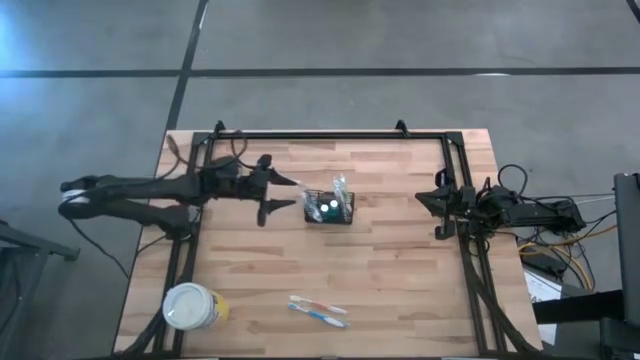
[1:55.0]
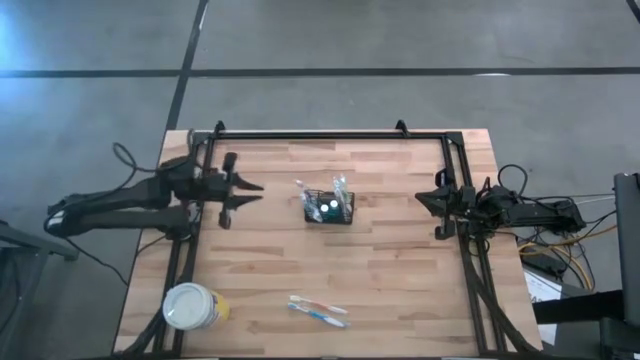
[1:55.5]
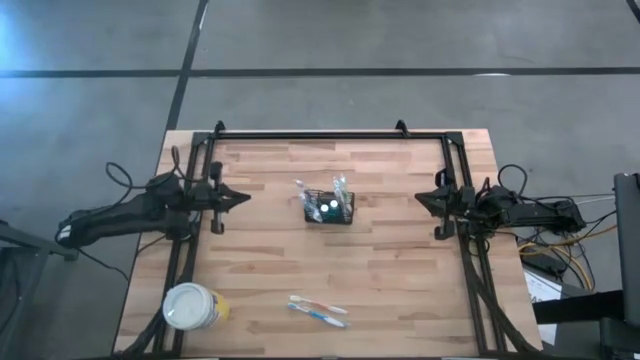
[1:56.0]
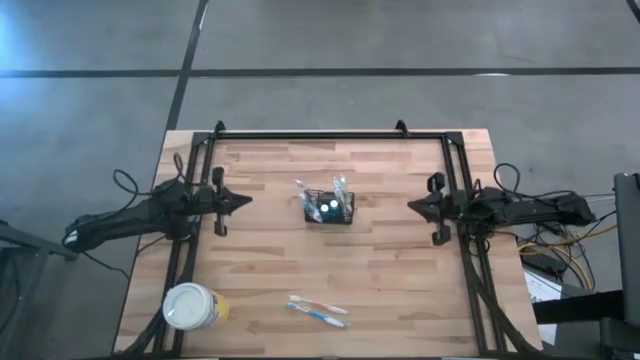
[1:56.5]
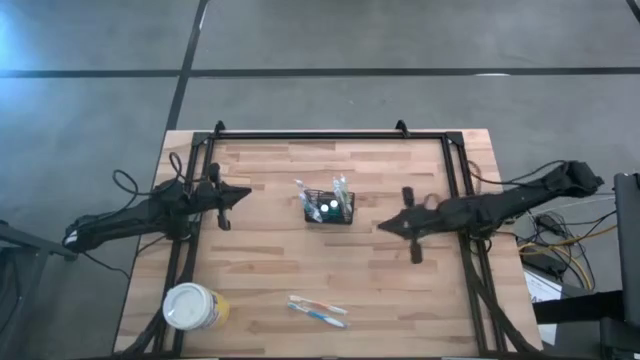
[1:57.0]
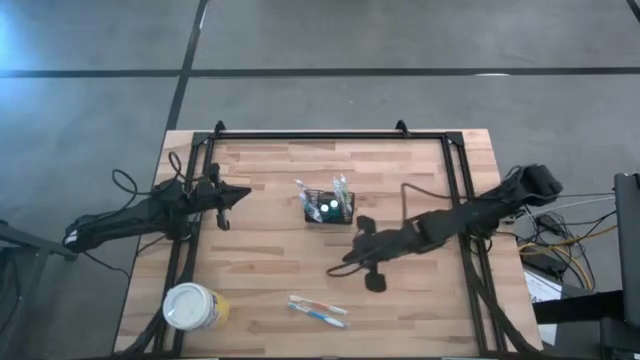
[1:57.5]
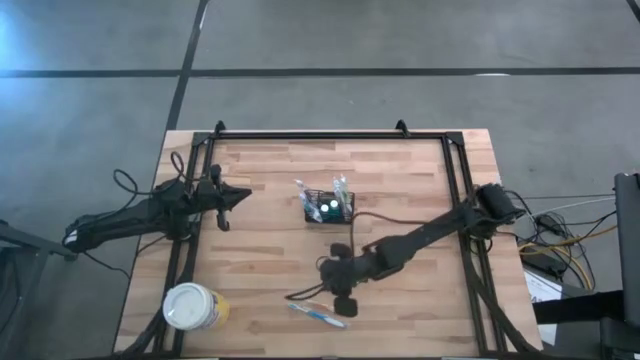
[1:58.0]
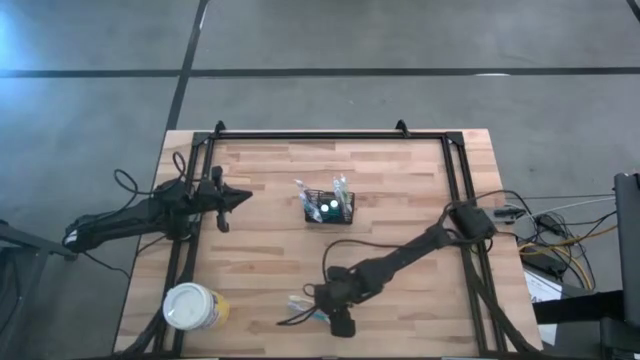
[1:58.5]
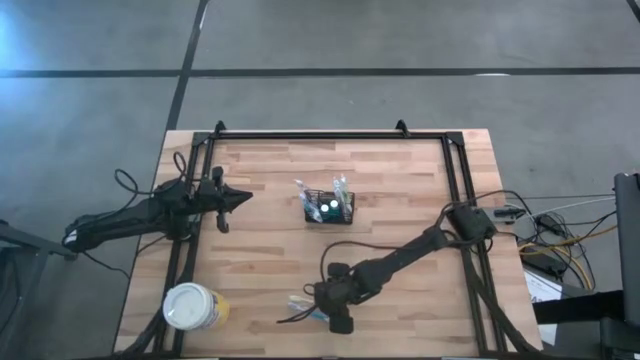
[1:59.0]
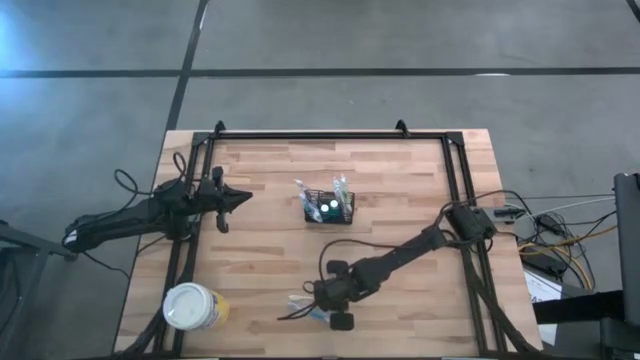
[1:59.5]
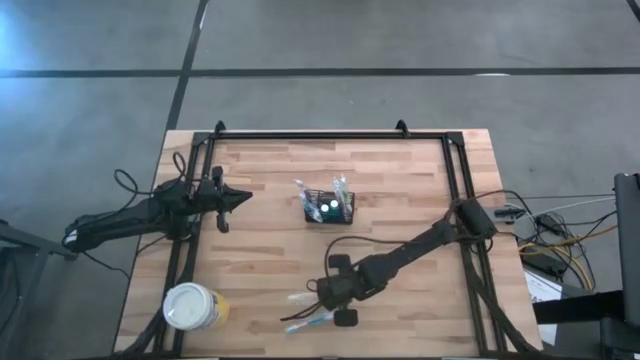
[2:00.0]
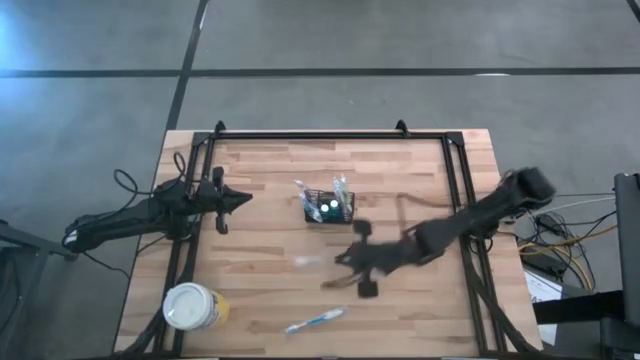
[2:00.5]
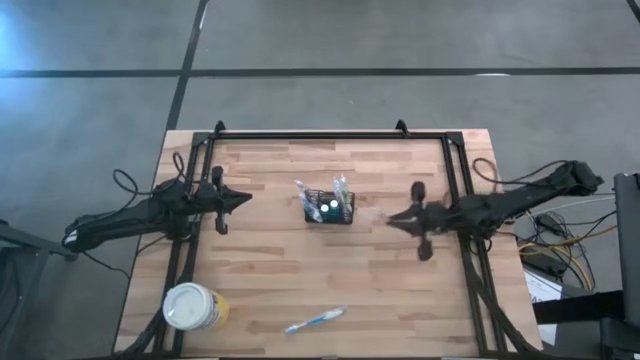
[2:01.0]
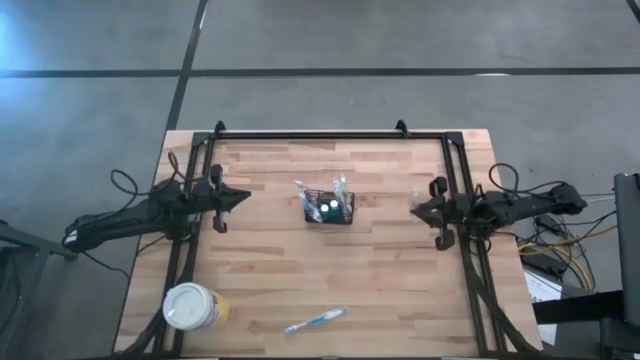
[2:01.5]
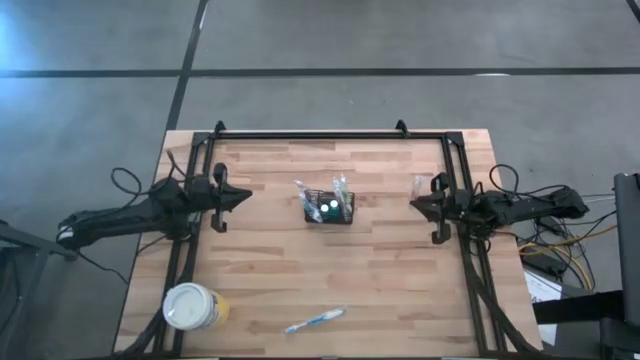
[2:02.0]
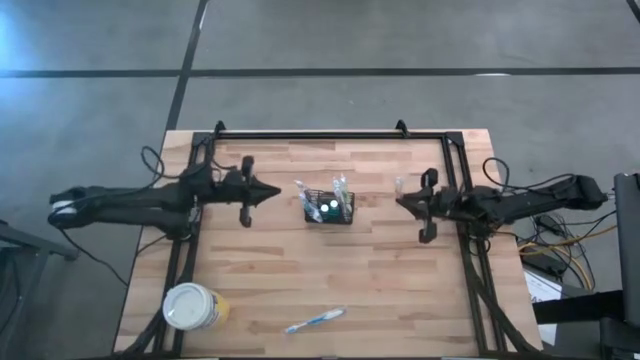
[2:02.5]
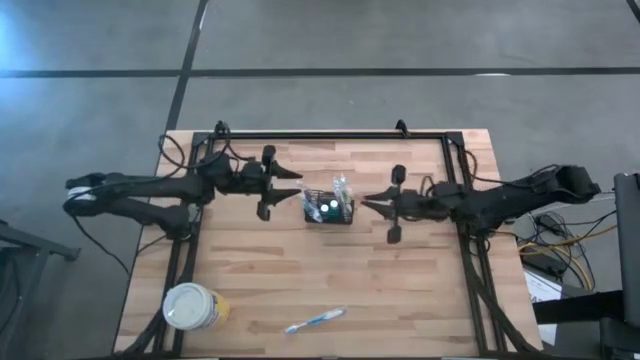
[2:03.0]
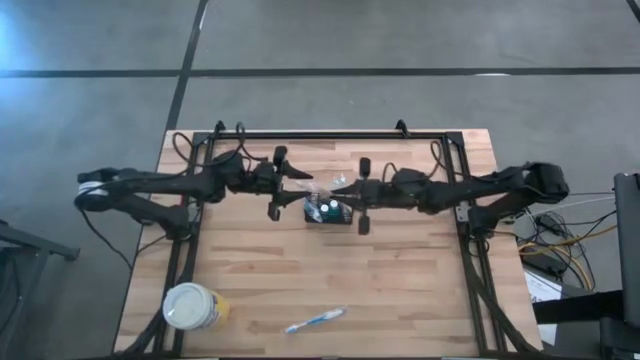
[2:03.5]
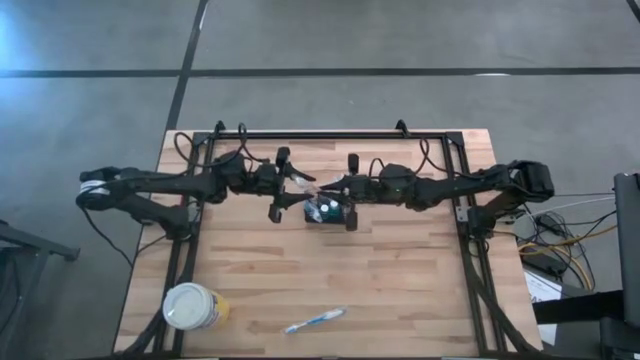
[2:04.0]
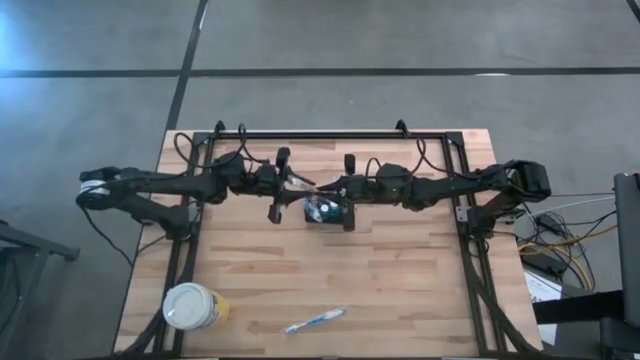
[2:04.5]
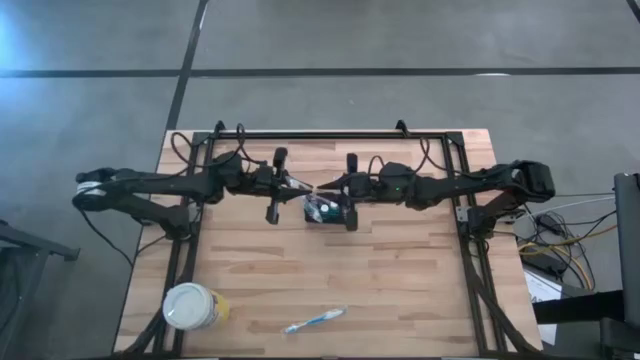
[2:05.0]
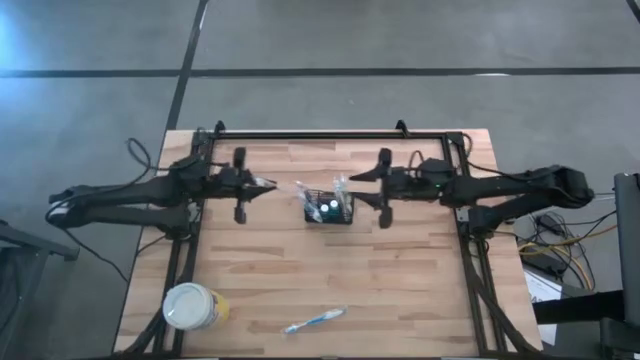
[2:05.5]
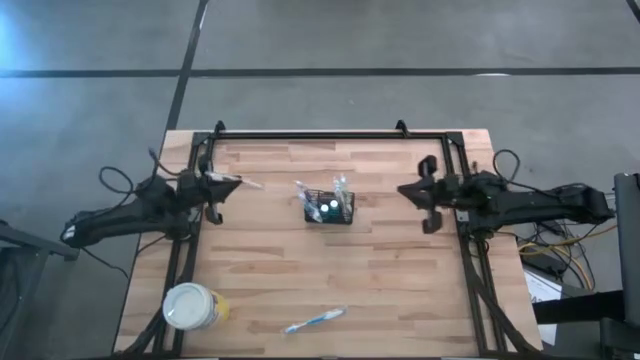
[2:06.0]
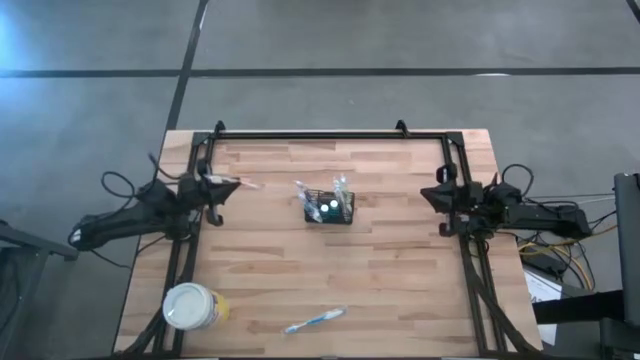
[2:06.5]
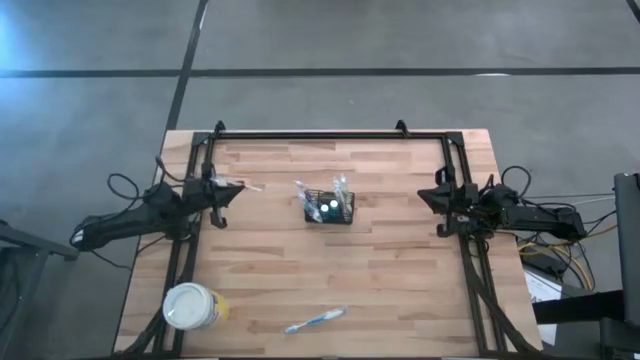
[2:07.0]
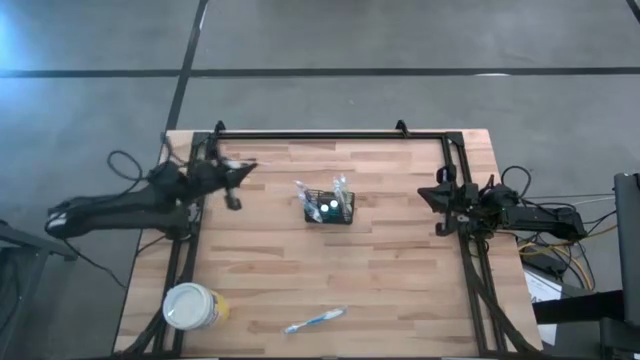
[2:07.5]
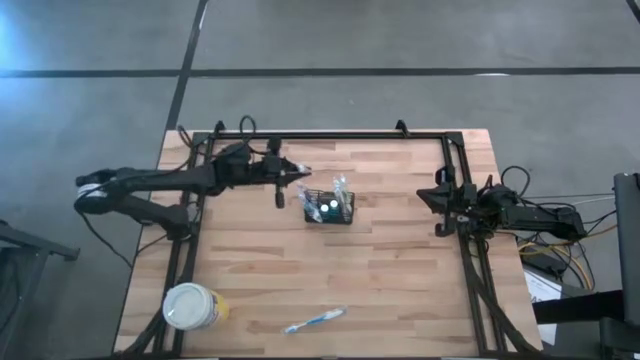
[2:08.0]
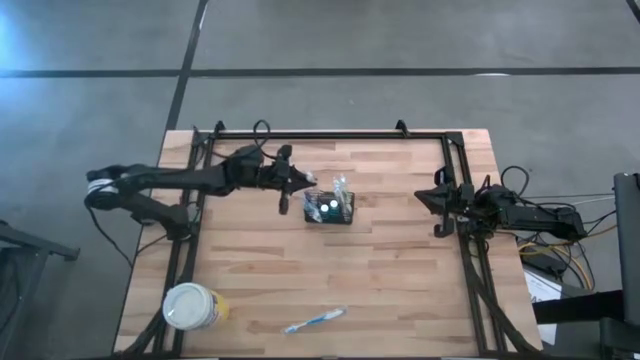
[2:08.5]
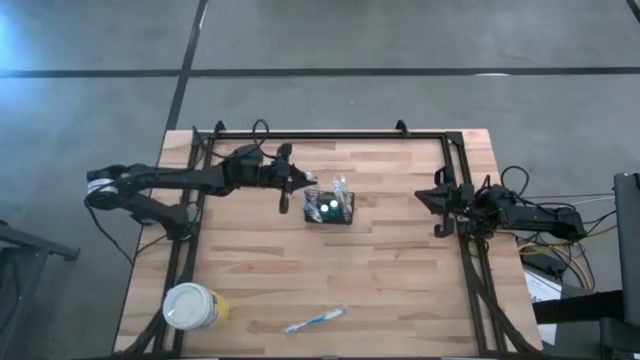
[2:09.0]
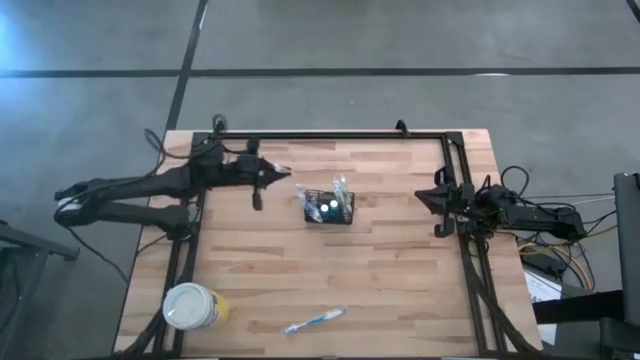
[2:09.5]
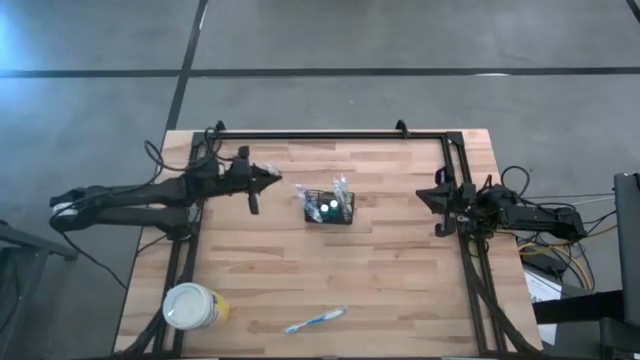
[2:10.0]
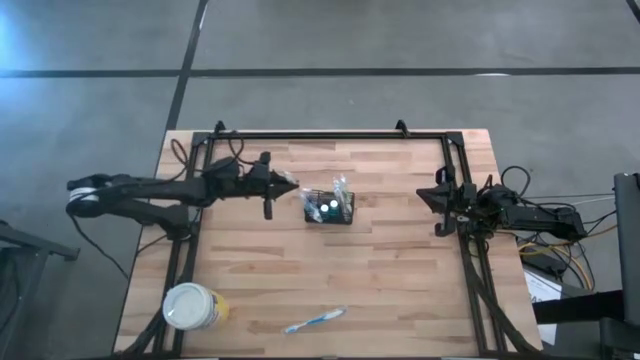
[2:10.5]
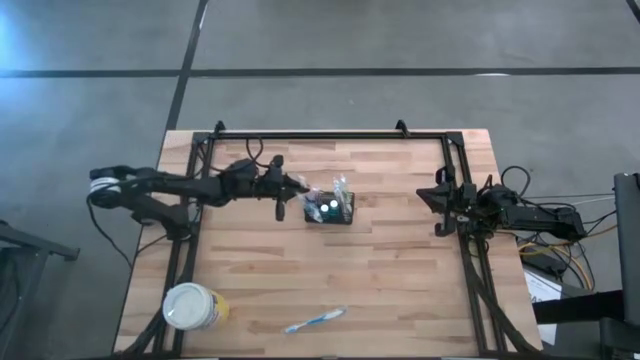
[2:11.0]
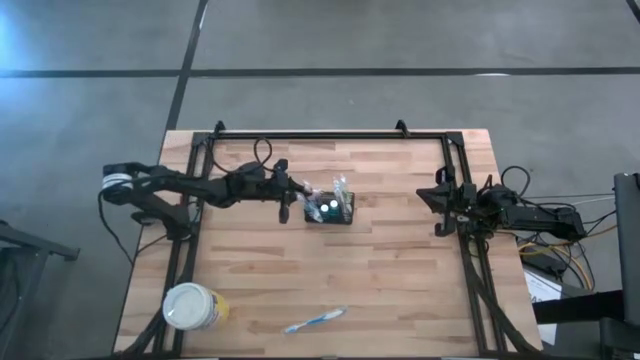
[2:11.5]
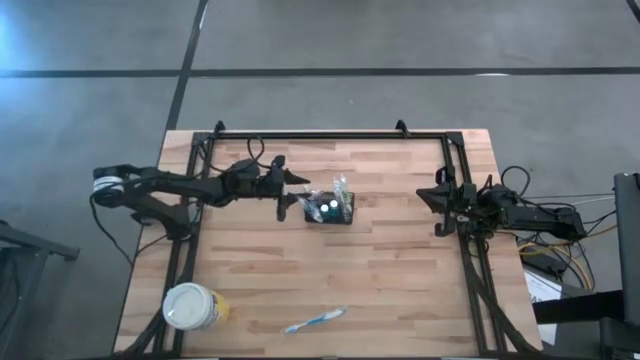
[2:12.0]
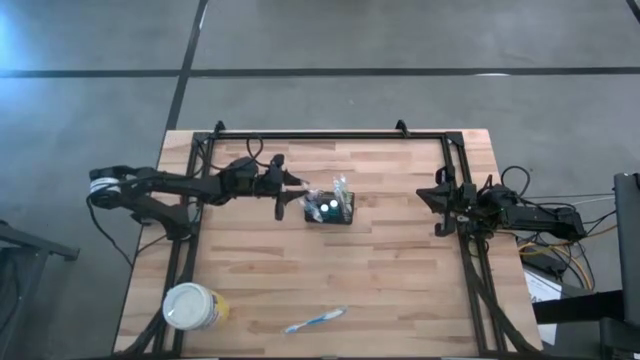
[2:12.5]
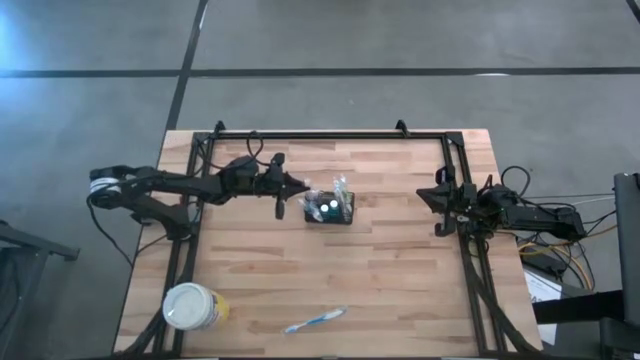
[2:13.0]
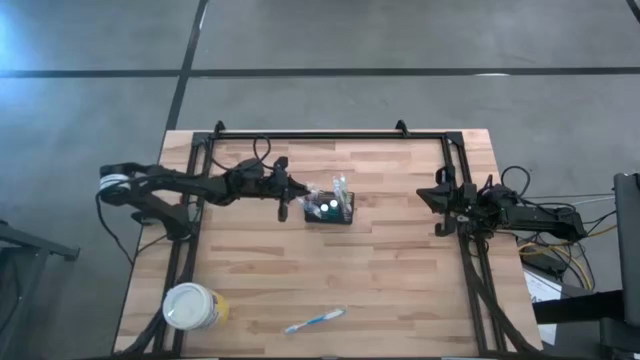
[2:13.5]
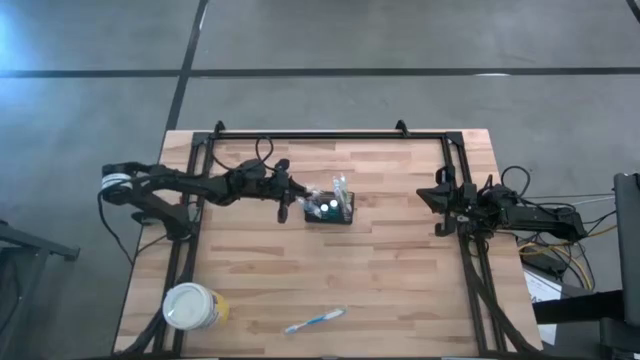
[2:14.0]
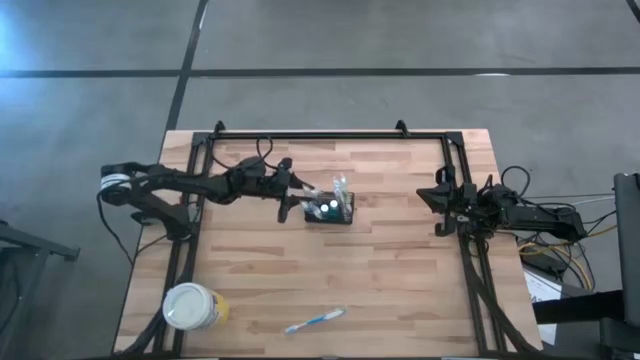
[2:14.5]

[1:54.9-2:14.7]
Task: Pick & Place toothbrushing station
Put the orange toothbrush into the black organizer

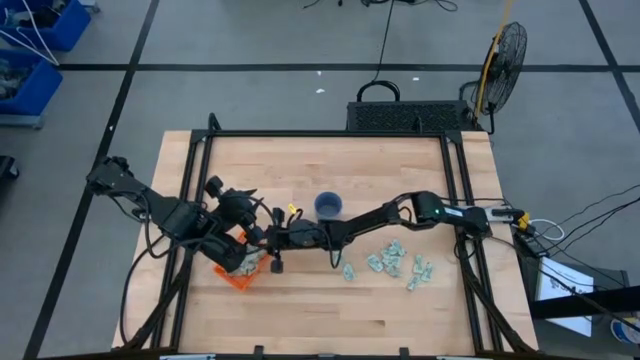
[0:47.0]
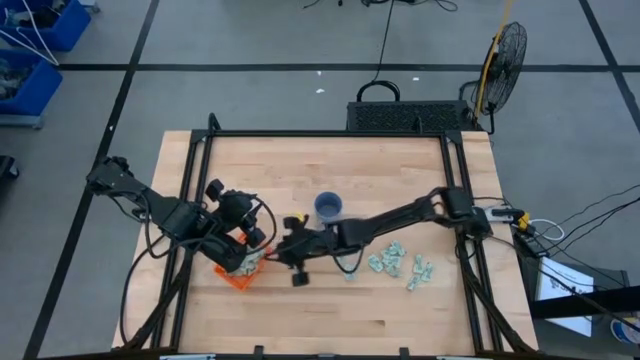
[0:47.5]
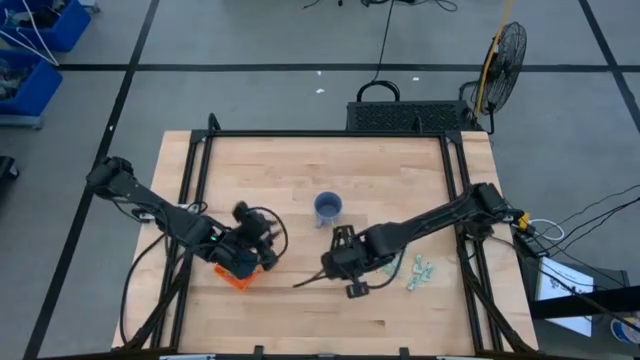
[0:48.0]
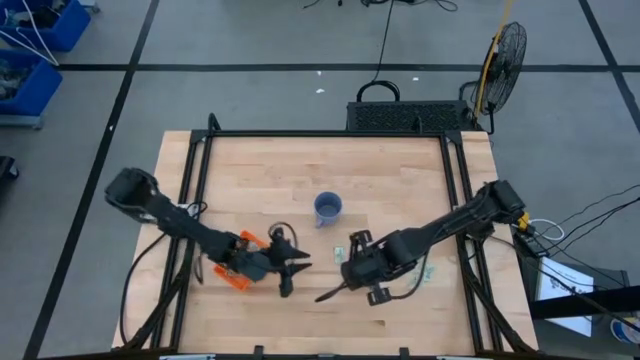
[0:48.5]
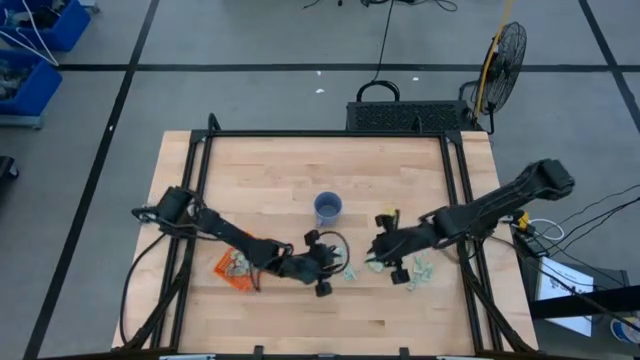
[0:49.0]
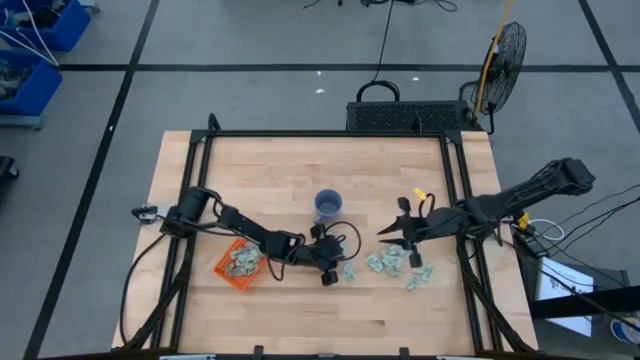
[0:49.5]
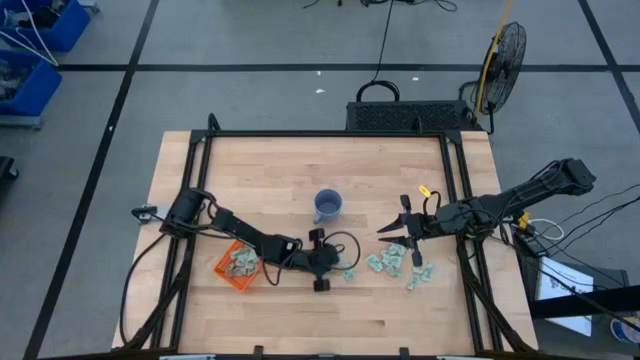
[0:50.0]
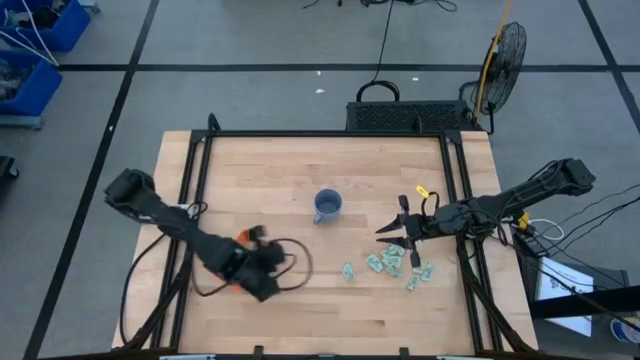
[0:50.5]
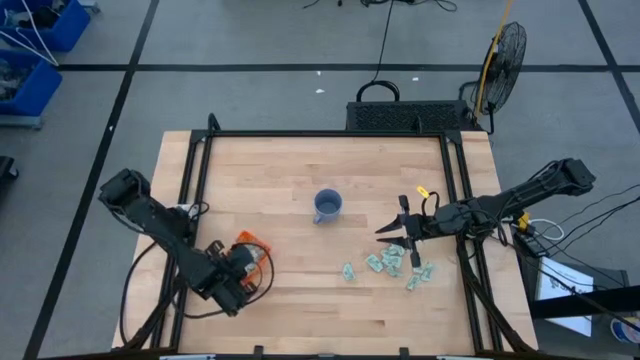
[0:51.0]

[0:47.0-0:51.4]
Task: Pick and place Stevia / Truvia into bins
Put the green stevia packet into the orange basket
